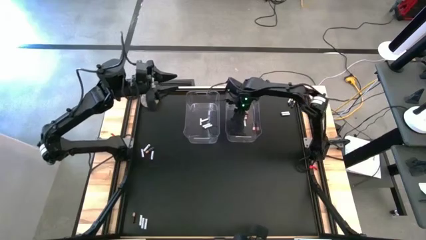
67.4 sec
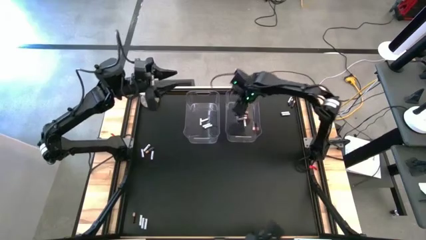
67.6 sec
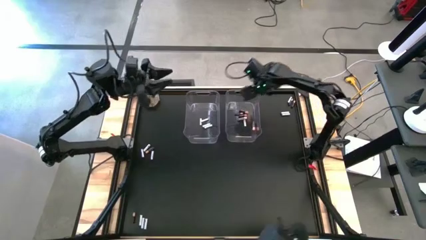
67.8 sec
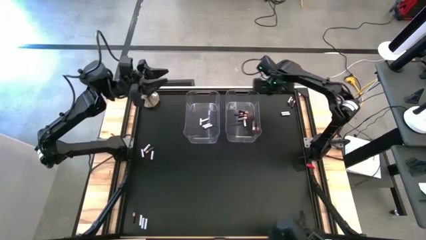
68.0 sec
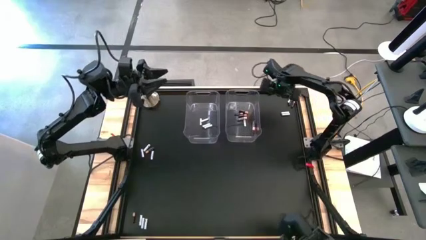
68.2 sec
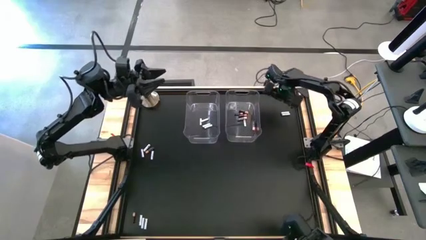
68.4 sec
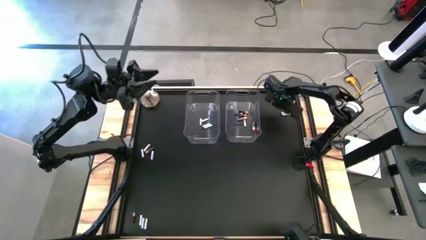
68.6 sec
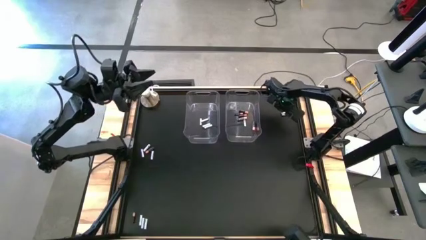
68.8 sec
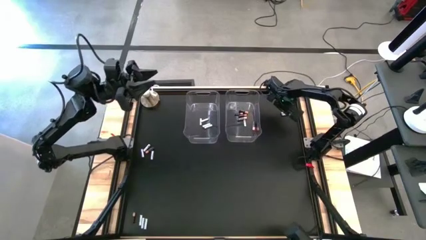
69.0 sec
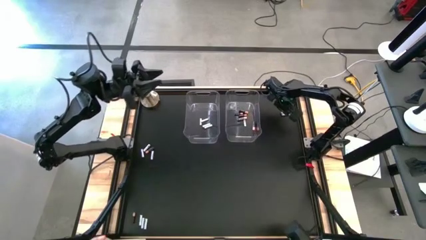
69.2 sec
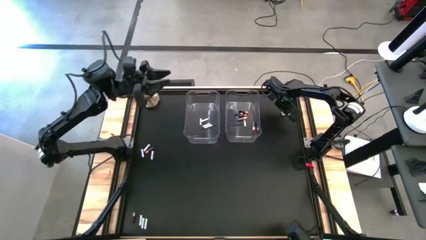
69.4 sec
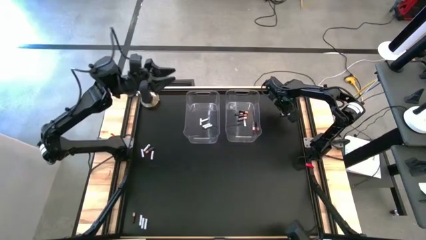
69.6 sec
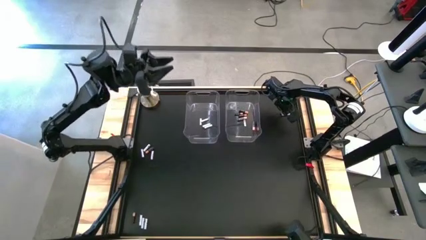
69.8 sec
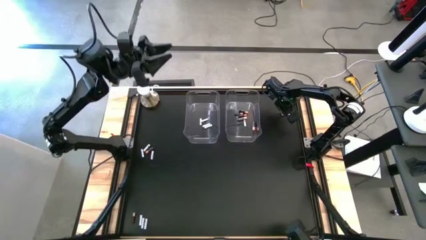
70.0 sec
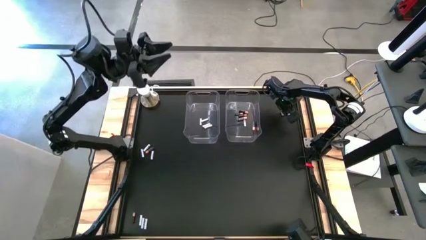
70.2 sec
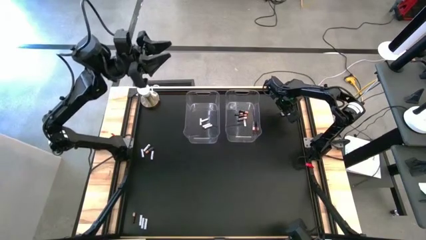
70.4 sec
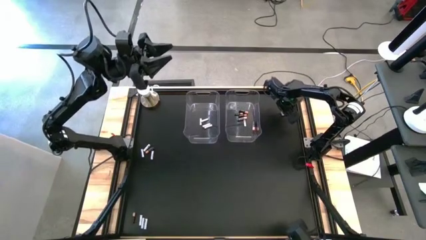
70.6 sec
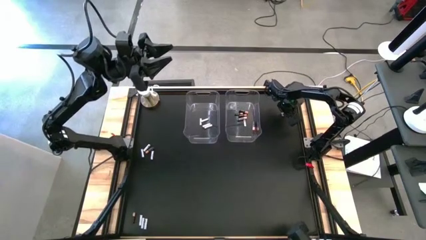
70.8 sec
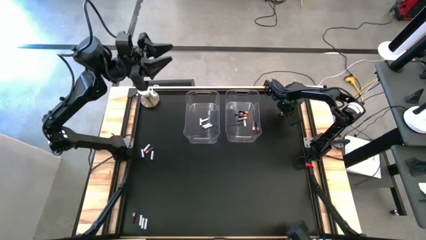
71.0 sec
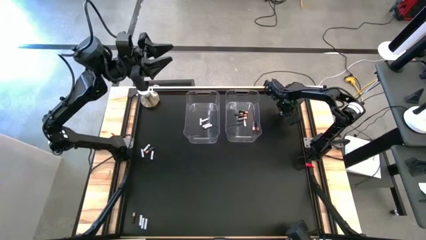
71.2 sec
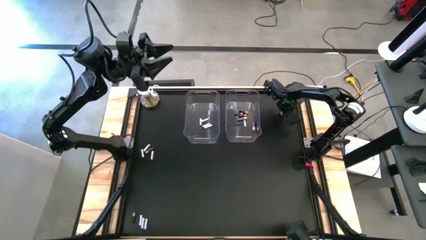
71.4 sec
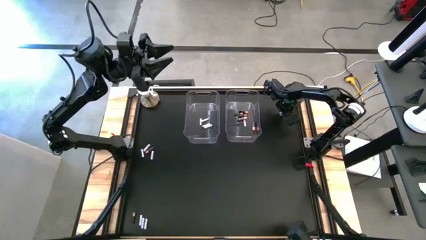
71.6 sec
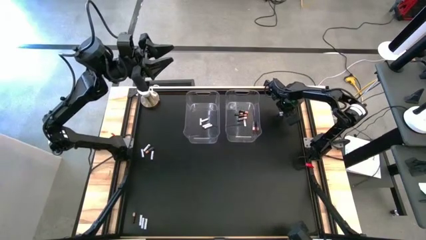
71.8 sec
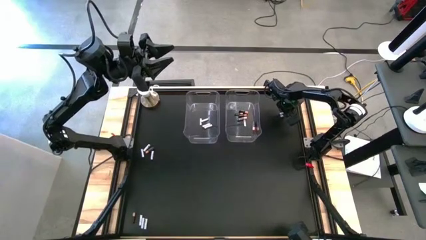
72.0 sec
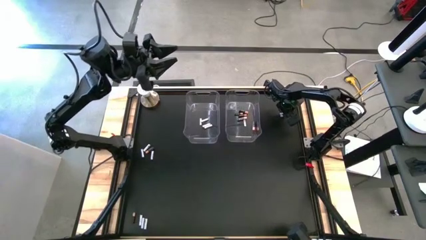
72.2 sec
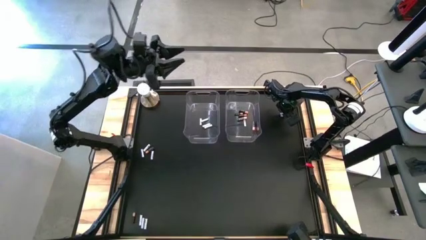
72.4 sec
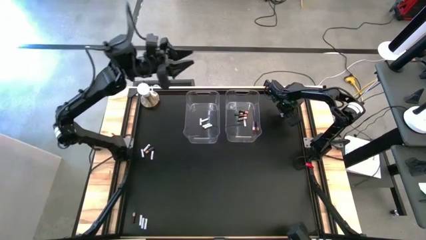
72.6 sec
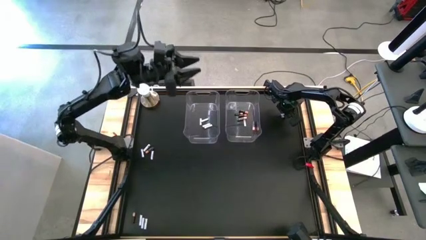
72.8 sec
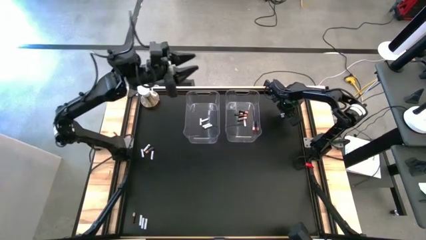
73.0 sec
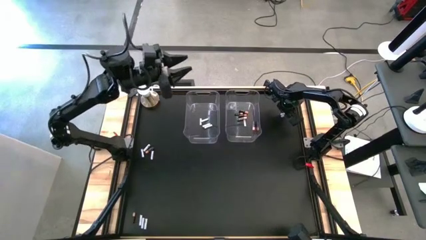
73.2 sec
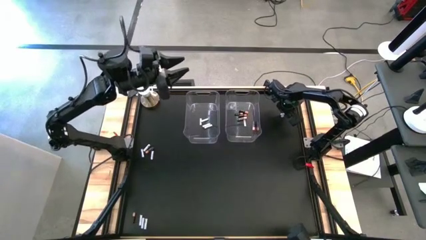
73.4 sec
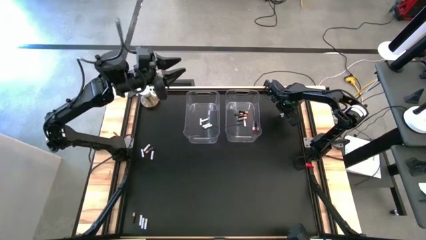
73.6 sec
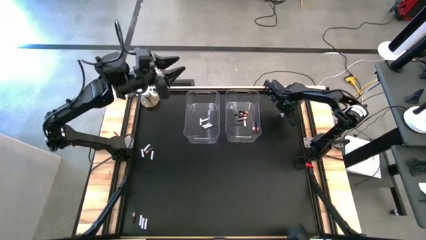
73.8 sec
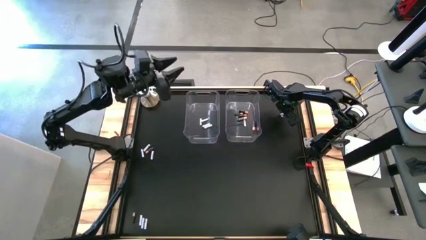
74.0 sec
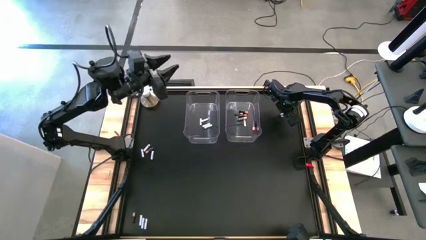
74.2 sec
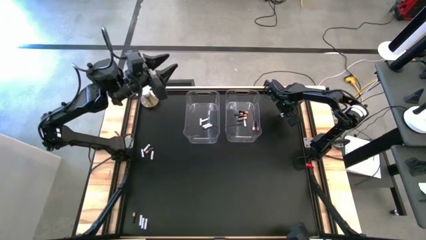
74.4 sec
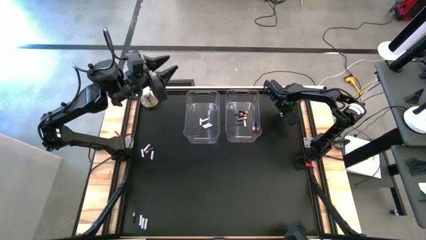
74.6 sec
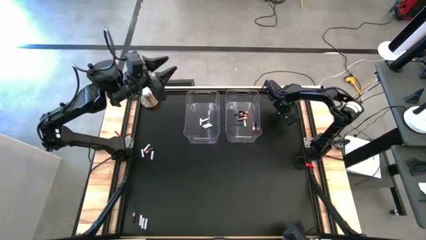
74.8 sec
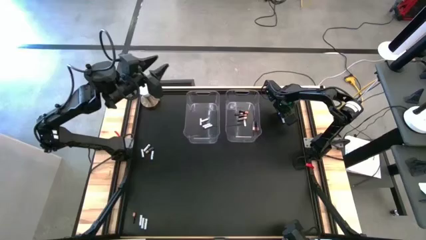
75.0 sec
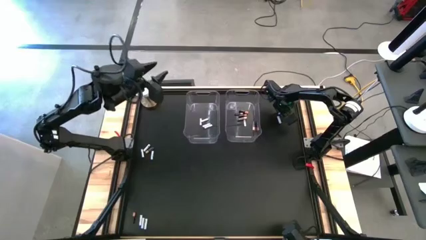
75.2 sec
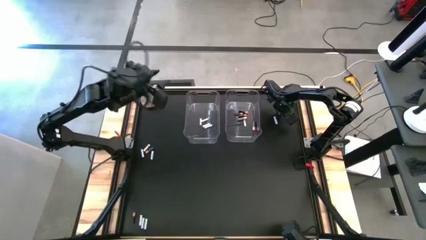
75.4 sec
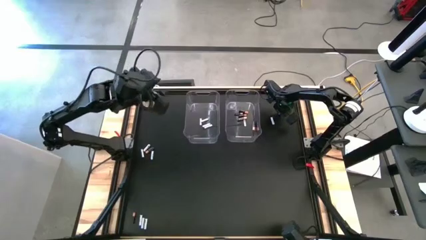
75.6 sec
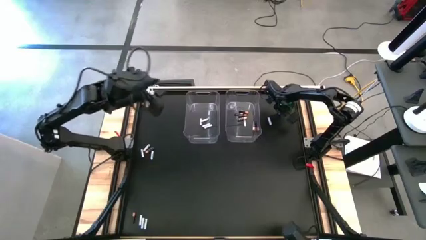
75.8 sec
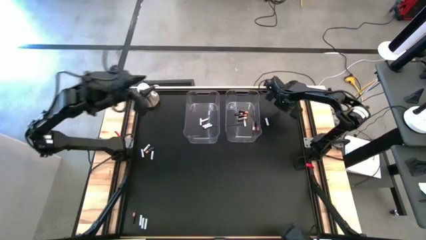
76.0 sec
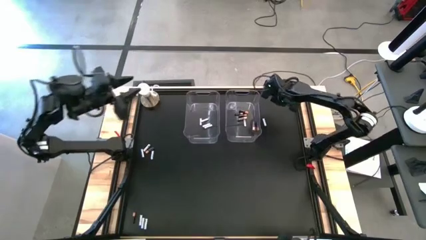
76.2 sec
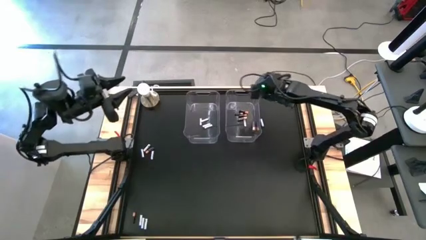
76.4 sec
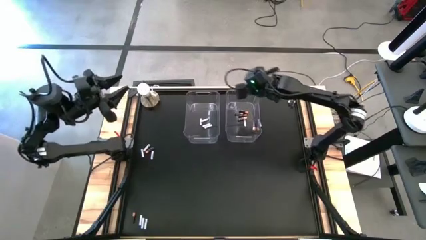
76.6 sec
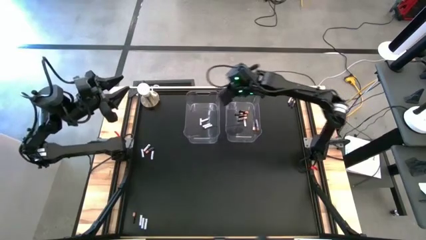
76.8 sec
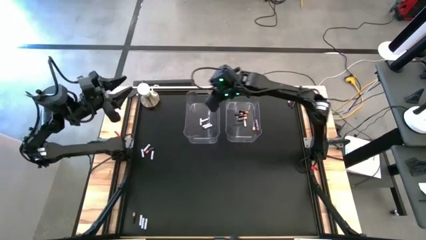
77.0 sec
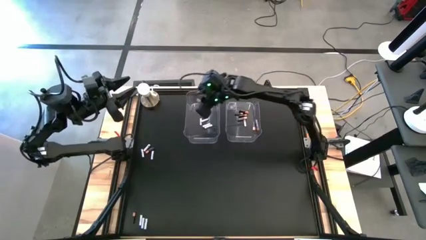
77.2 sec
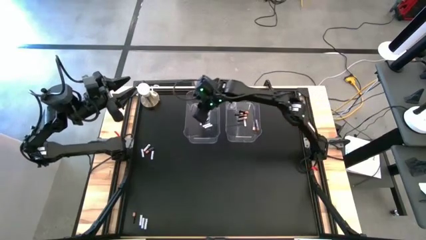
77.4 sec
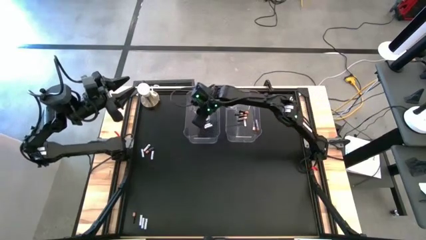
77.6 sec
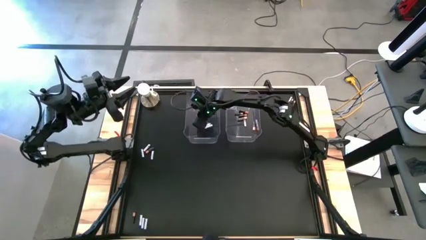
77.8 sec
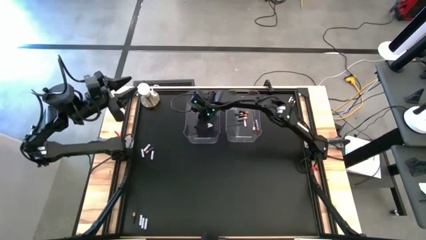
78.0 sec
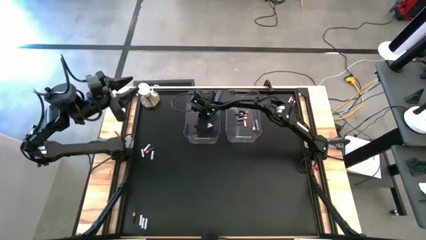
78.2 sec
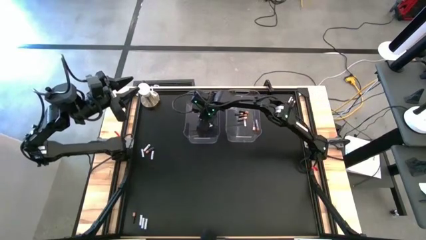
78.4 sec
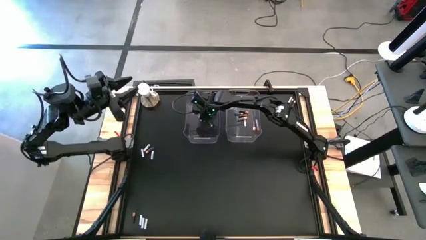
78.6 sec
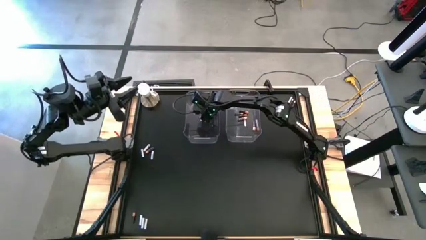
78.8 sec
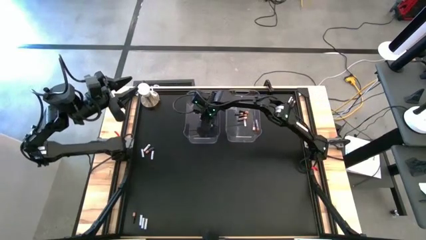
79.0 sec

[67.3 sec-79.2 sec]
Task: Sort batteries
Put the white battery into the left transparent bin

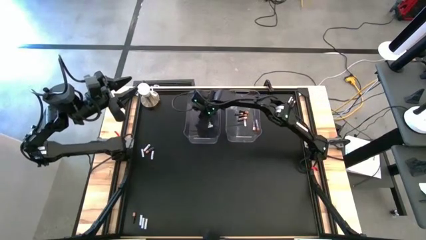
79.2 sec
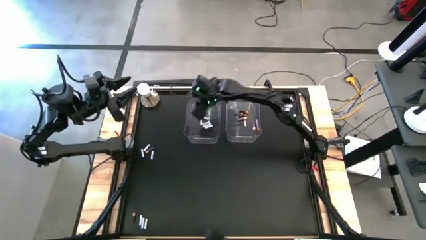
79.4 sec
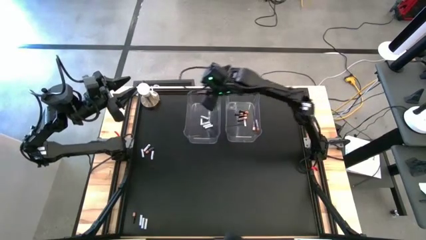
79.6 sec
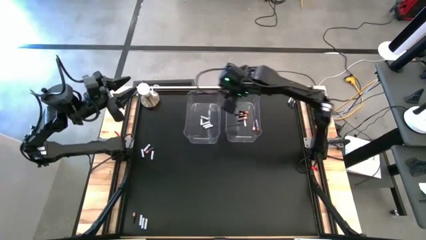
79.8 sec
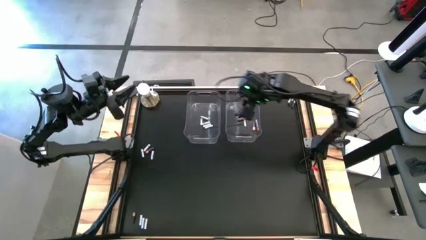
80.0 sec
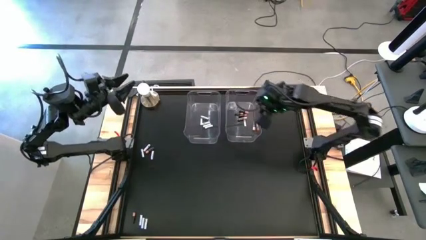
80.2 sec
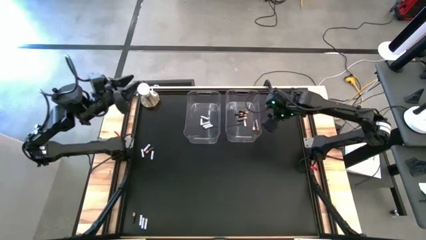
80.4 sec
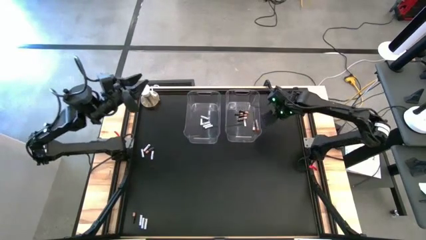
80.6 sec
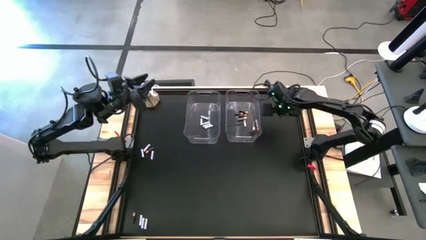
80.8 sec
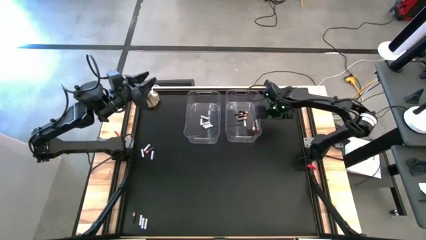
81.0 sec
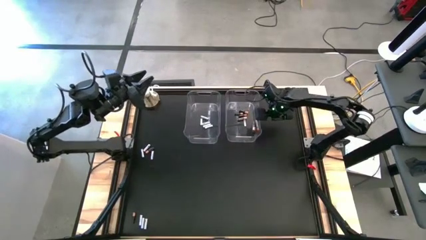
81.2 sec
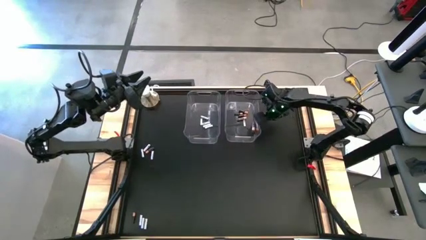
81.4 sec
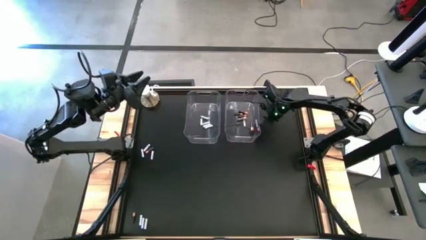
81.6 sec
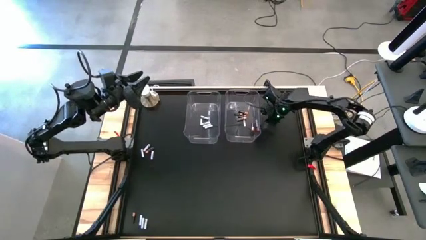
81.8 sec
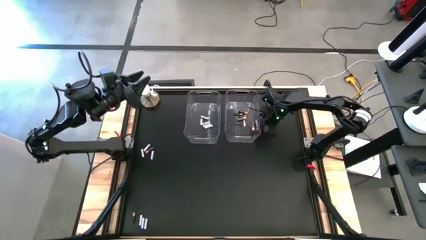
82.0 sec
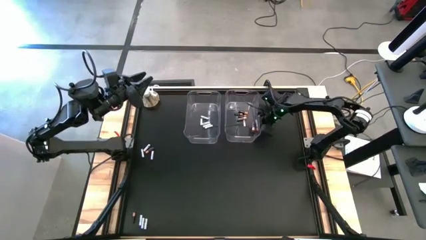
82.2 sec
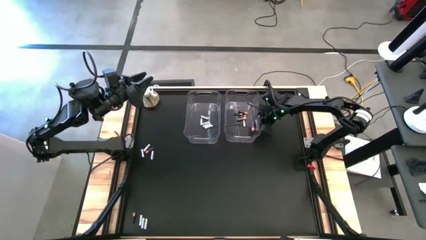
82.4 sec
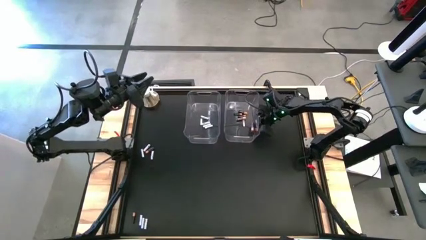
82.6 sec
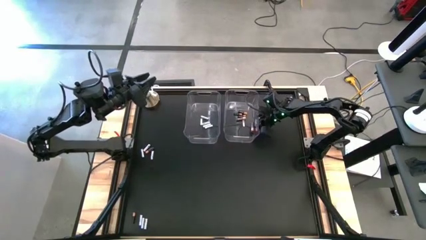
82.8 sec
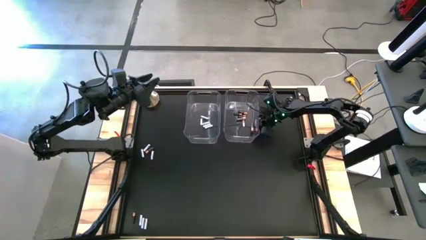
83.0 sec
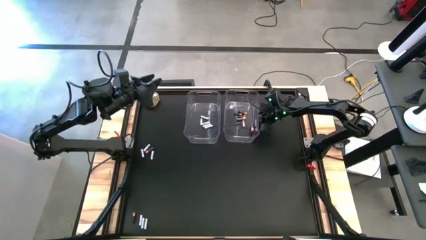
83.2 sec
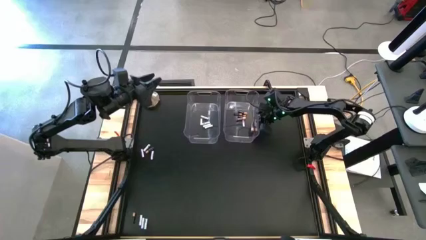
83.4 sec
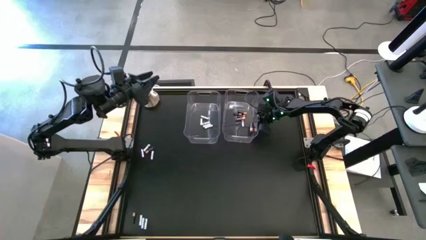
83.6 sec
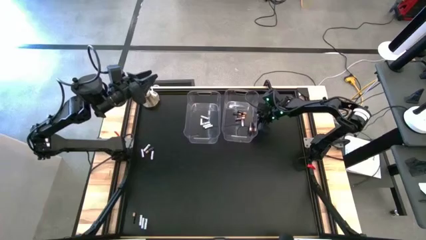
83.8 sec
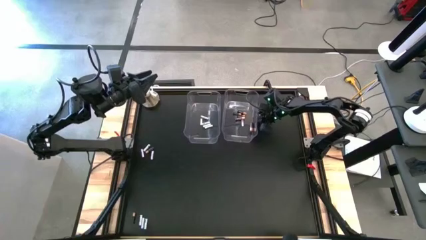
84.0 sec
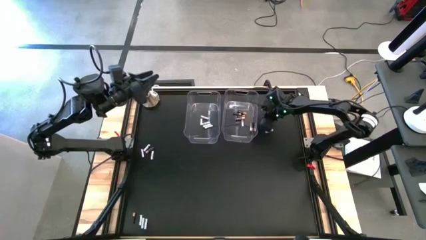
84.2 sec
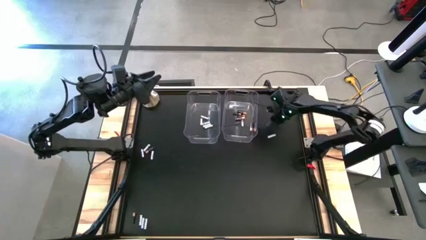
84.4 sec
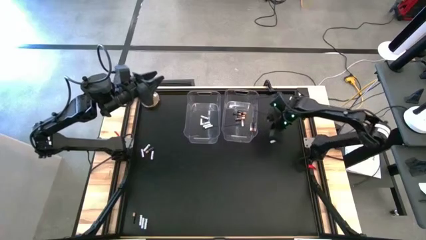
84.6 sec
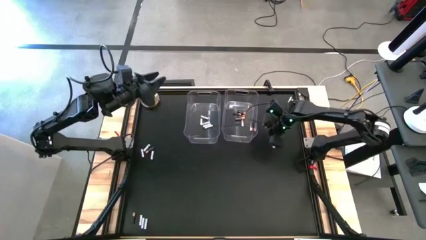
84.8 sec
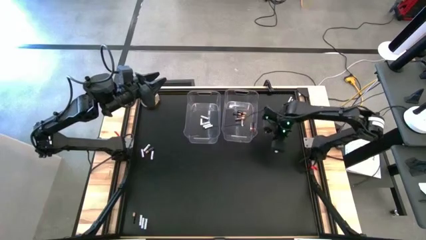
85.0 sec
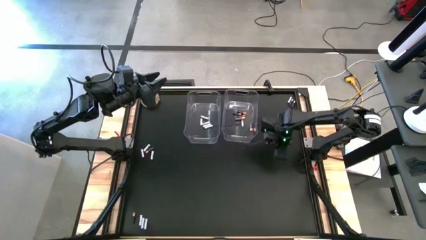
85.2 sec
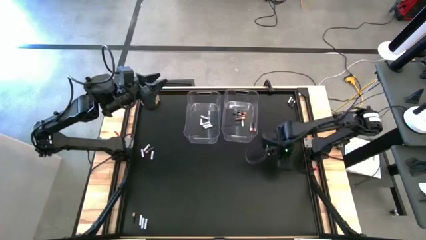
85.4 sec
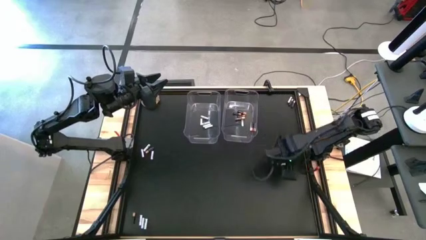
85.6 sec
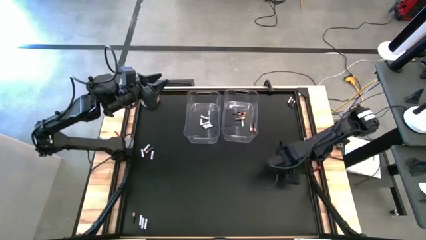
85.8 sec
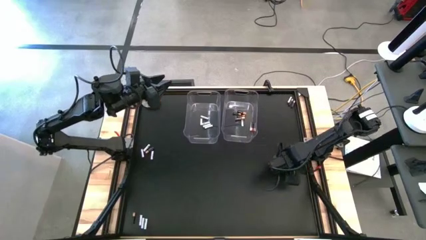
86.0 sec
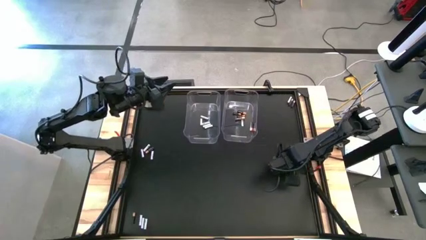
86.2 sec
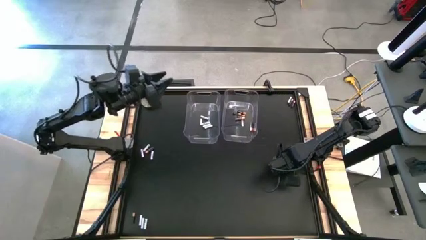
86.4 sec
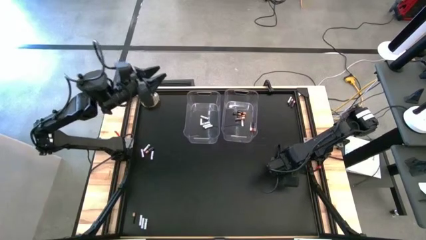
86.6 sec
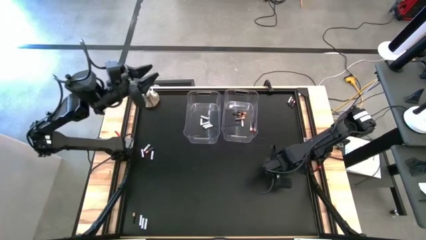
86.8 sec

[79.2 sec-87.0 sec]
Put the white battery into the left transparent bin
